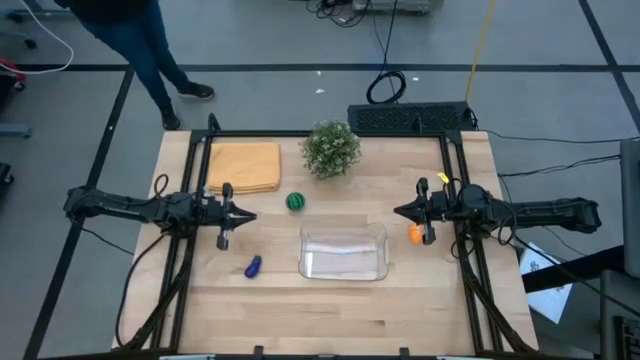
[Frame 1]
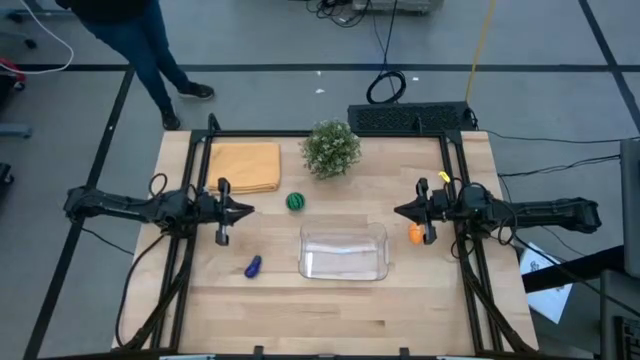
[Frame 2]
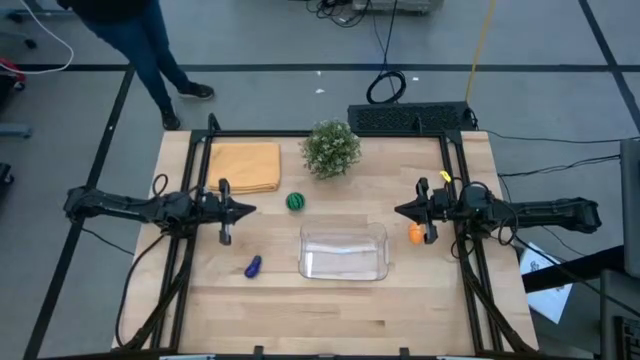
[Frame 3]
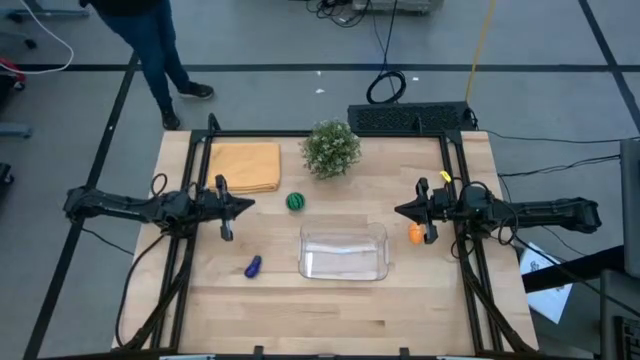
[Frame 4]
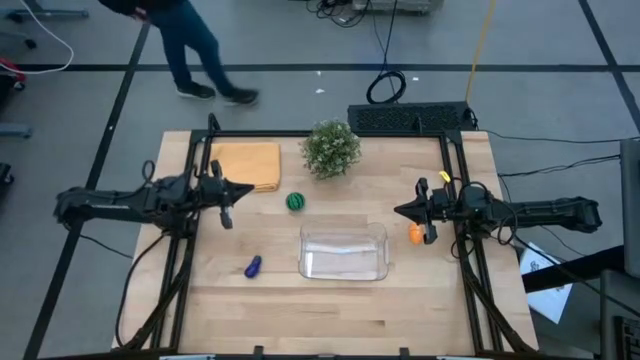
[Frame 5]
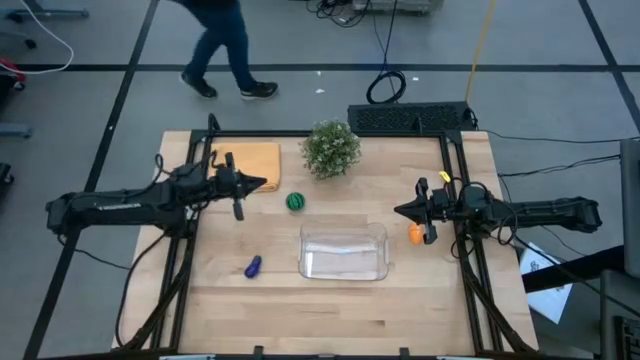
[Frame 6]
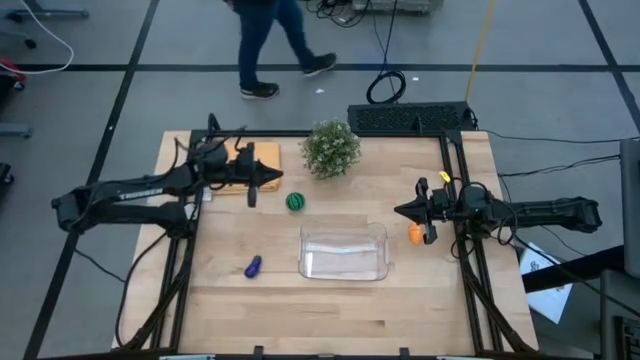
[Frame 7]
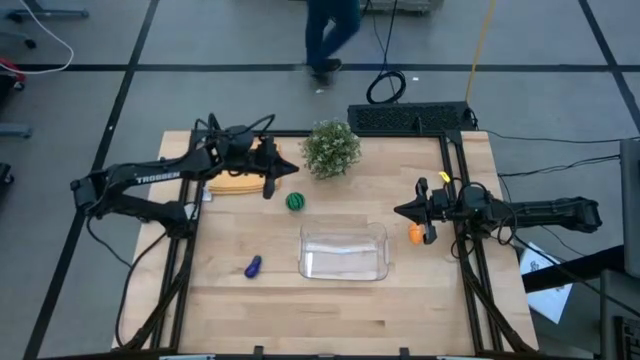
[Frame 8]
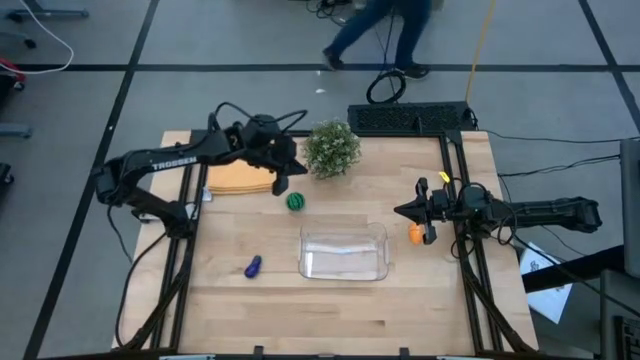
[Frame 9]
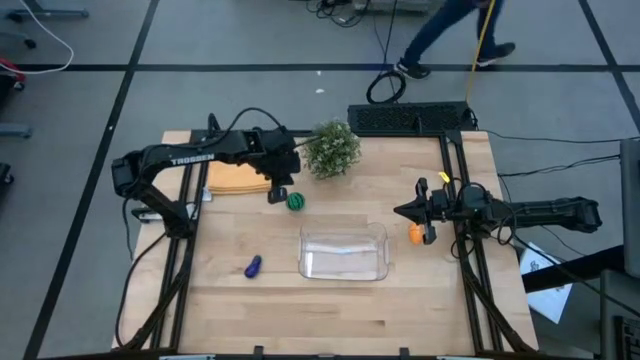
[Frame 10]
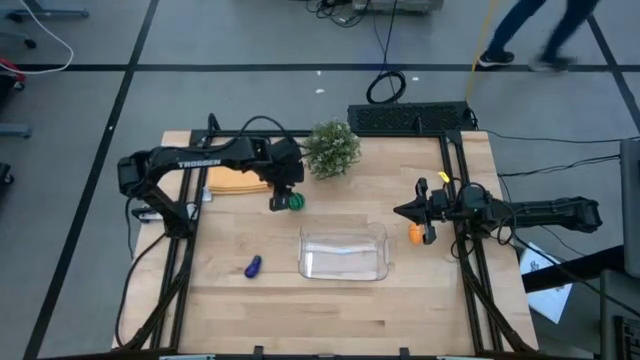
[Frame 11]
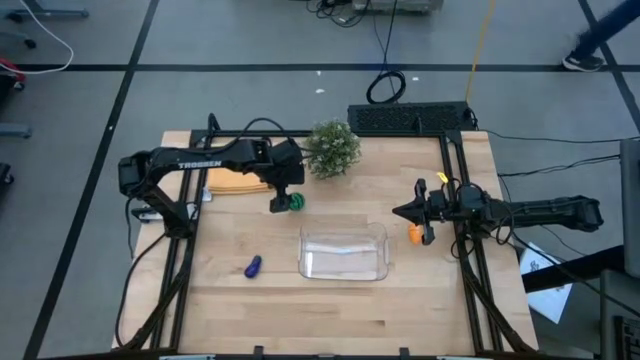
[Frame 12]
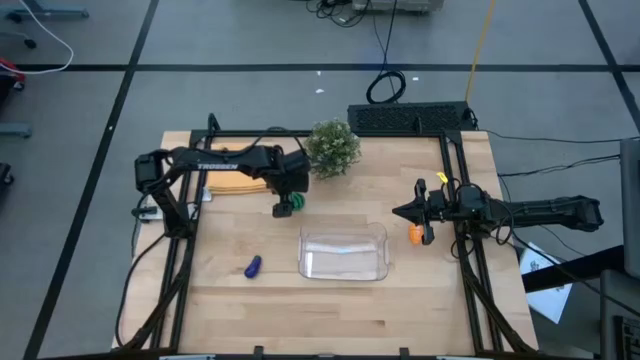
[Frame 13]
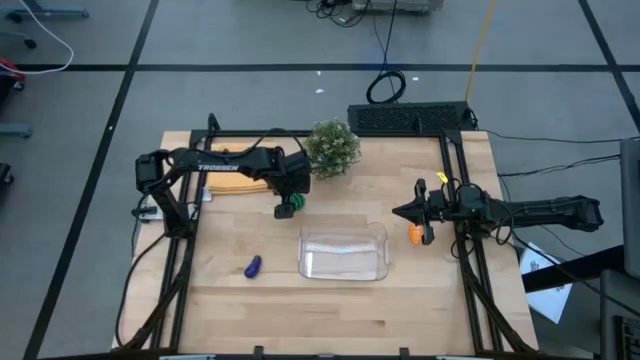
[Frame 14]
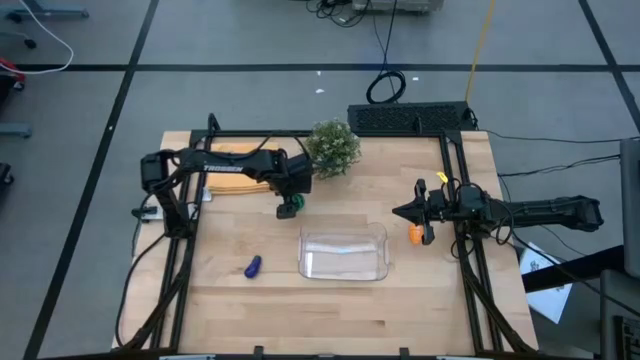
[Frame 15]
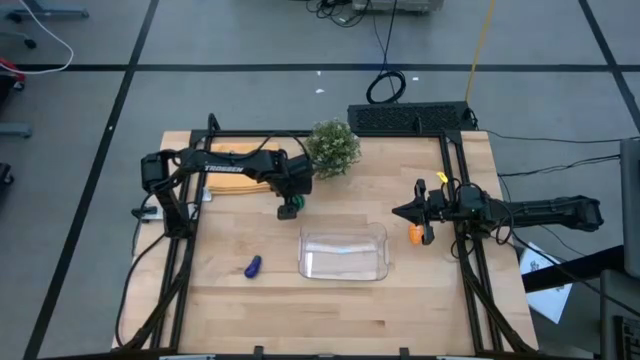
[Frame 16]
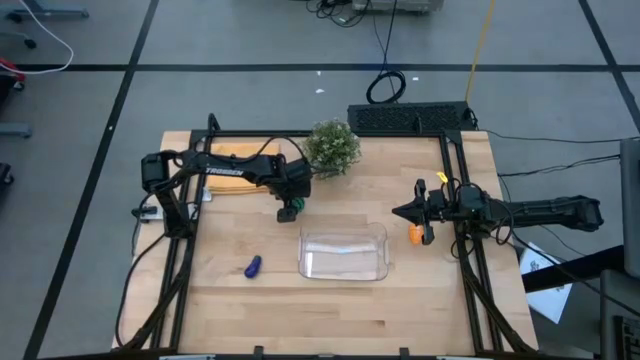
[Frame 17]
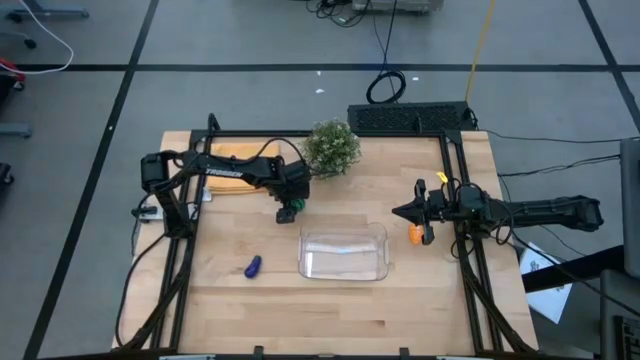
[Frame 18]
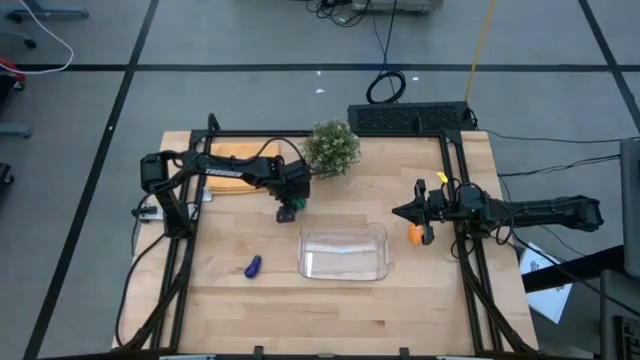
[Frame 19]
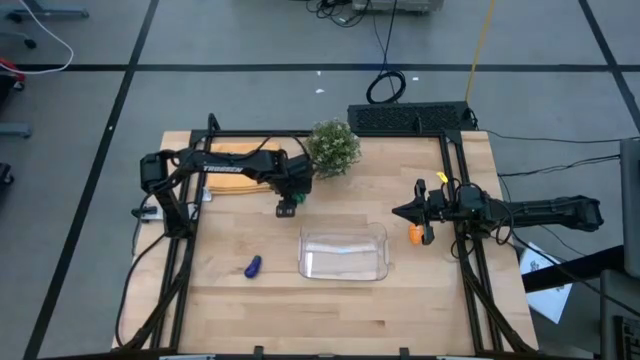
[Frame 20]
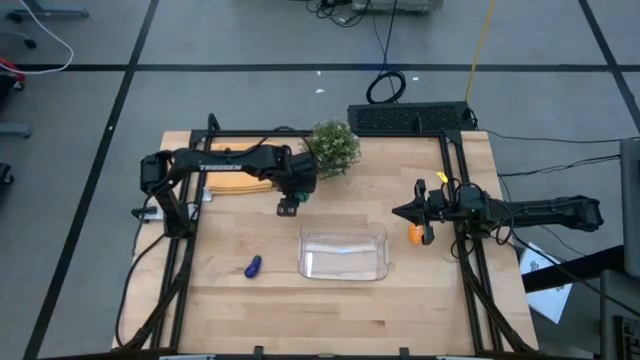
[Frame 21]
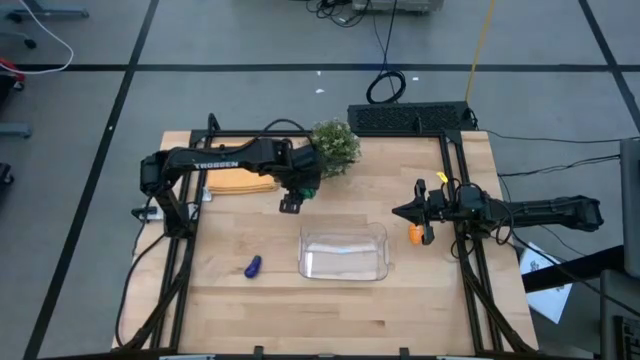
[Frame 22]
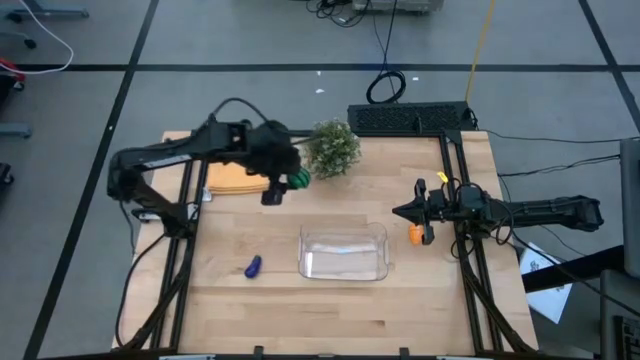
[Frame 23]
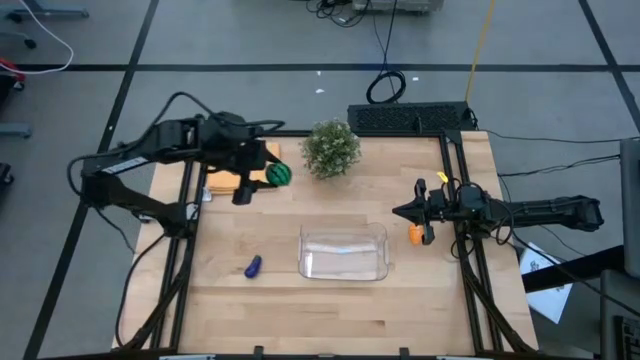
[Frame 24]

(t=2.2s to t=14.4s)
Task: Pick and placing Produce into tupperware
Put the watermelon into the transparent bin

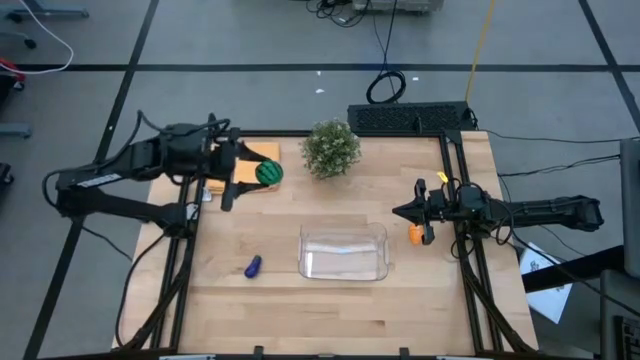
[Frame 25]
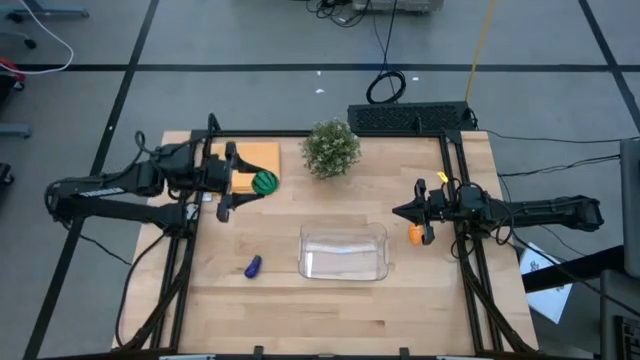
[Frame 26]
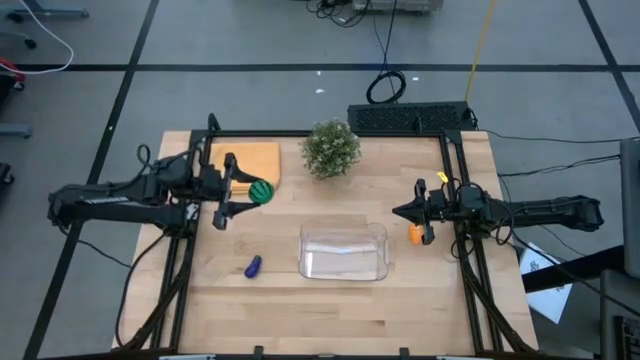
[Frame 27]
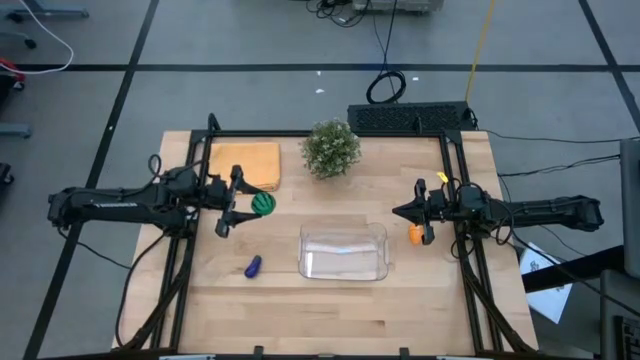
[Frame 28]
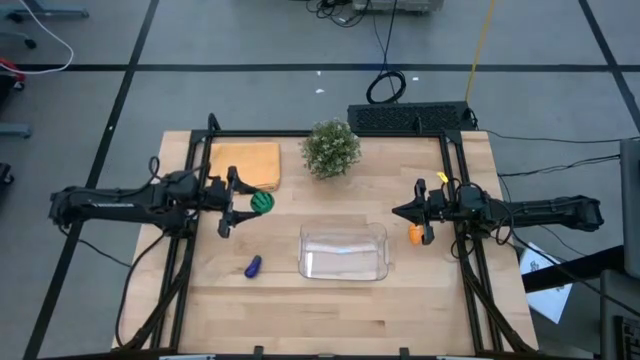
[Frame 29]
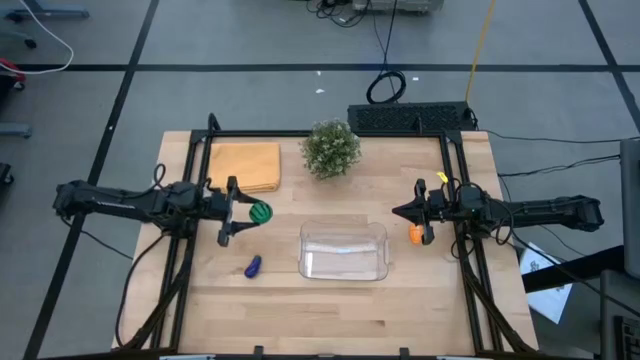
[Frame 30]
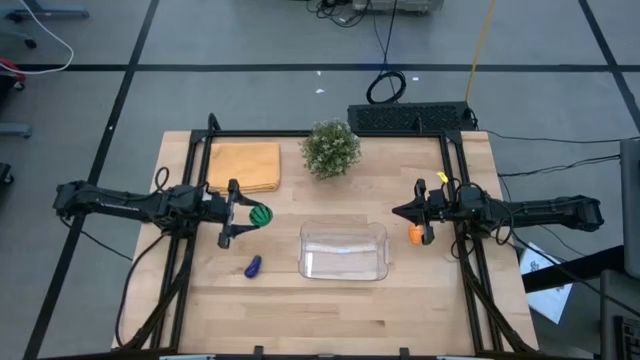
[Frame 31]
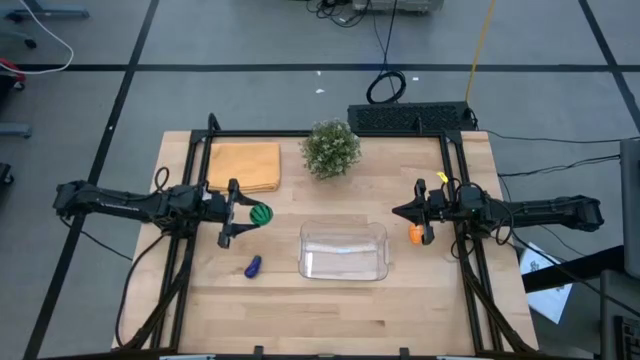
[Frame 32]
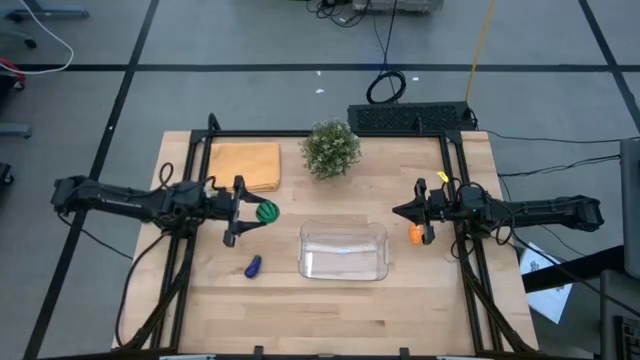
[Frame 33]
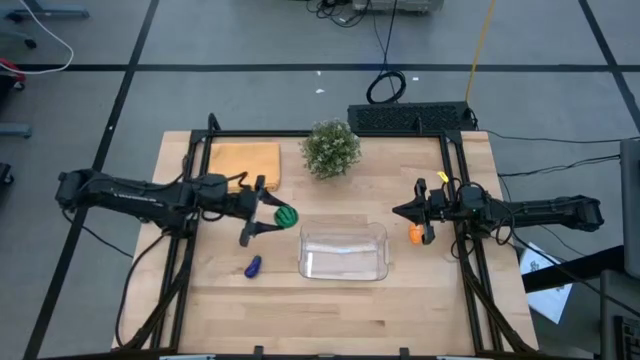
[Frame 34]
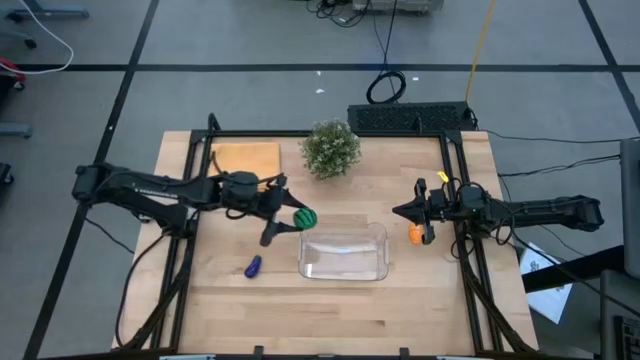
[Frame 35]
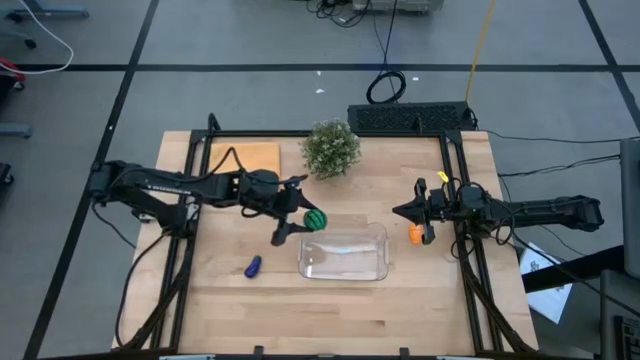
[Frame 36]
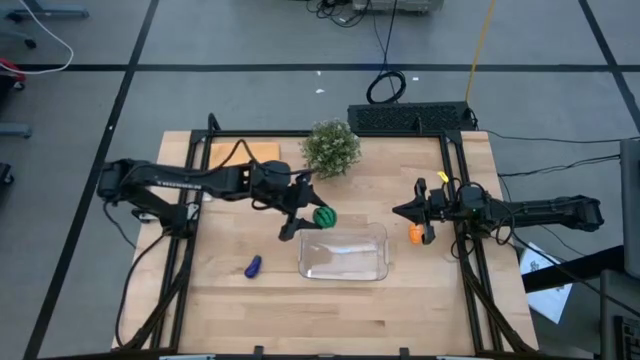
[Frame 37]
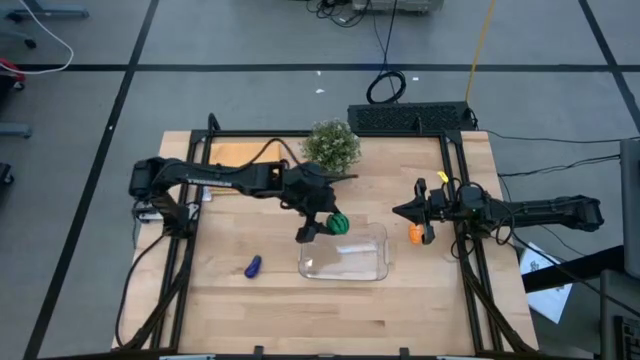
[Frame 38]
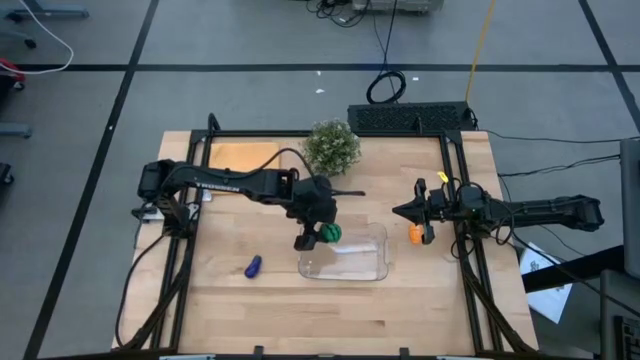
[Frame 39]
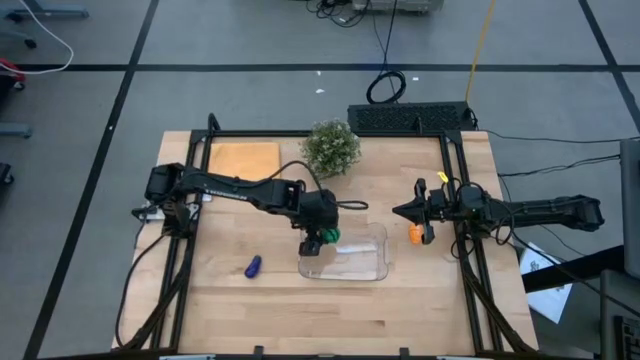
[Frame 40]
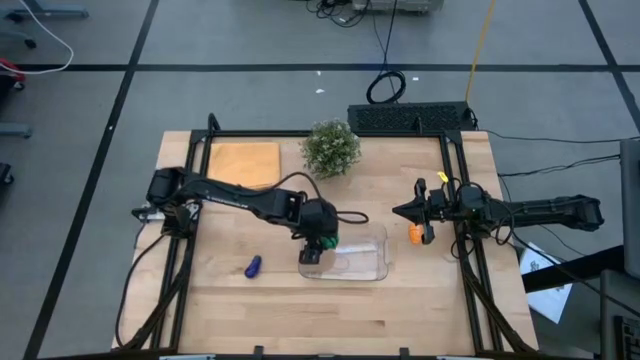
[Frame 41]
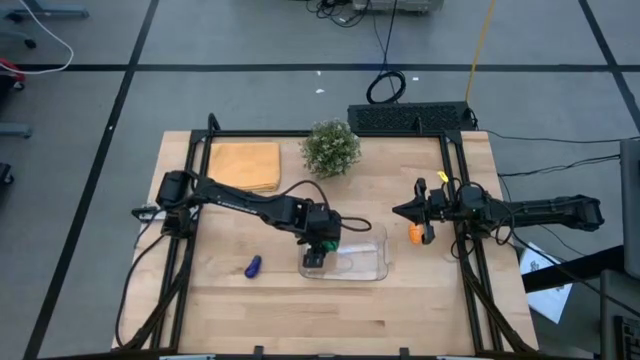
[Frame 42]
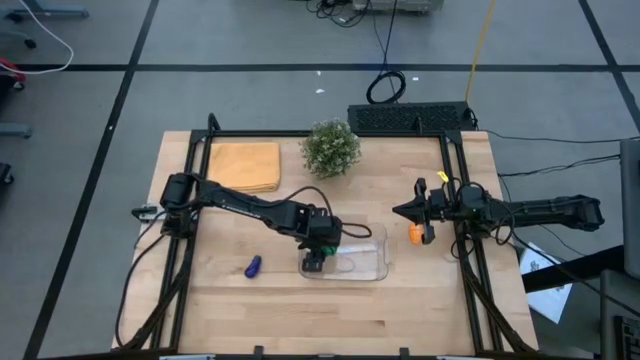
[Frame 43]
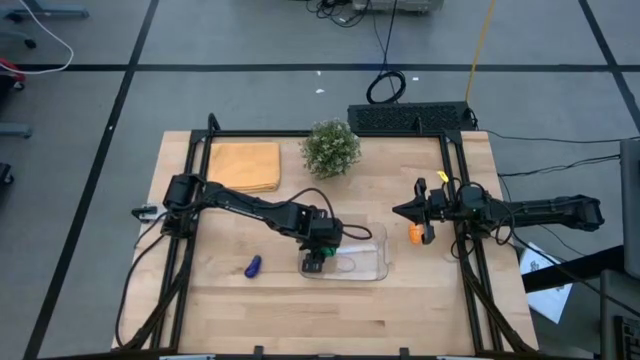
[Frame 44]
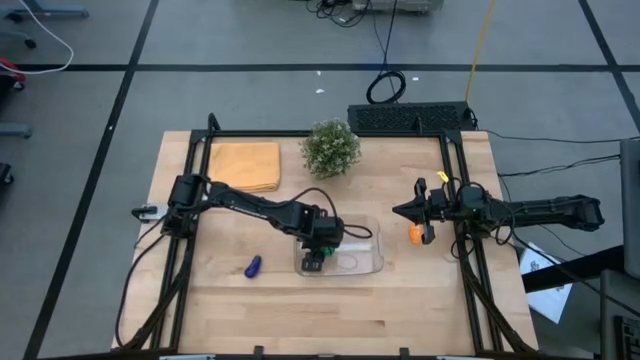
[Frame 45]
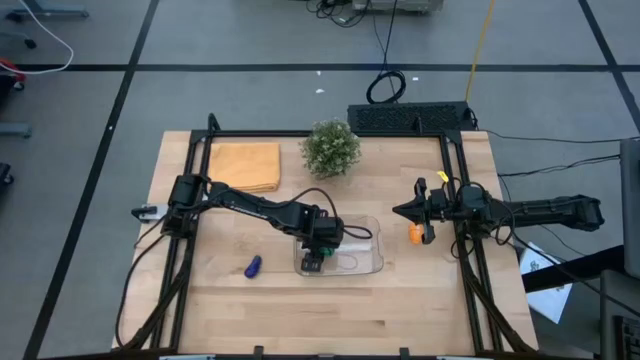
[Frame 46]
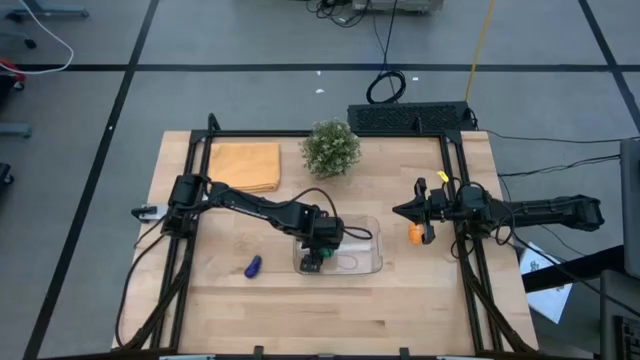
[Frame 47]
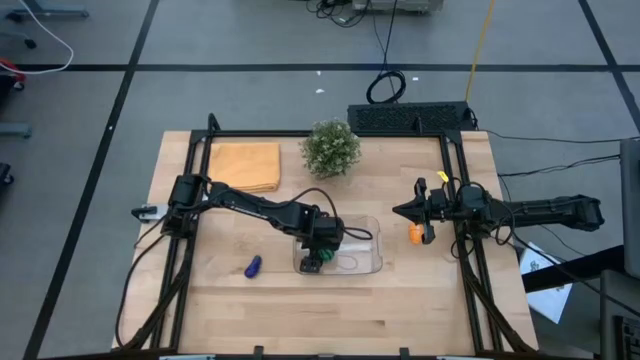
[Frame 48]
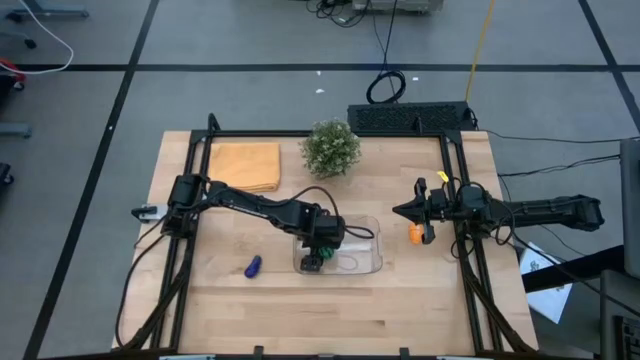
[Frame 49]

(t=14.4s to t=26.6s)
Put the watermelon into the transparent bin
